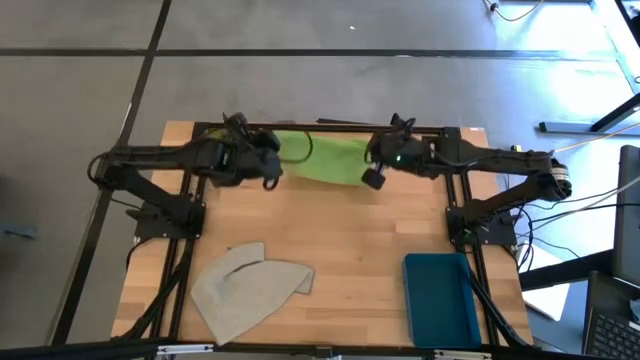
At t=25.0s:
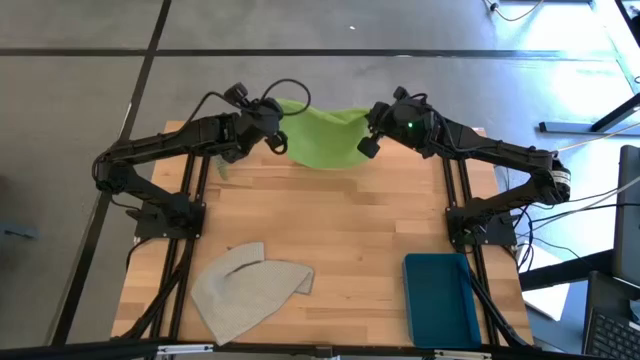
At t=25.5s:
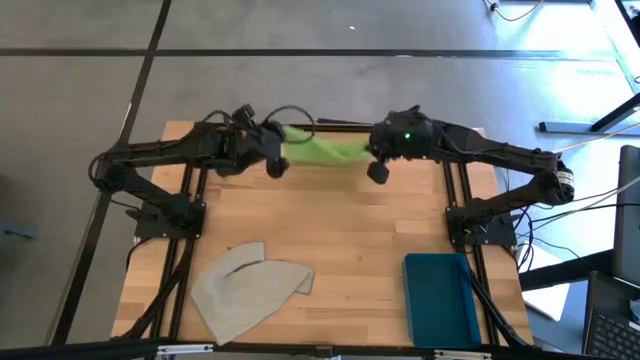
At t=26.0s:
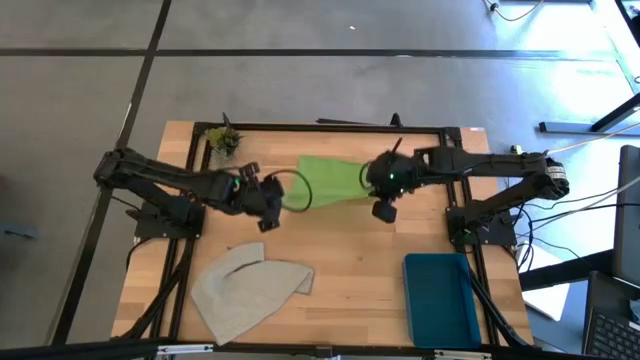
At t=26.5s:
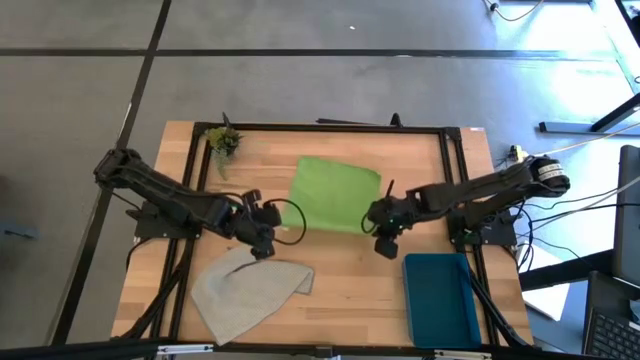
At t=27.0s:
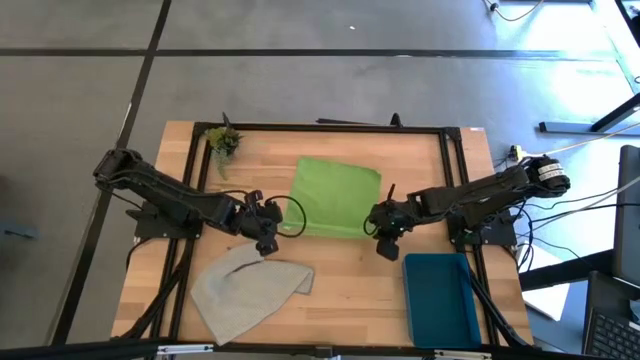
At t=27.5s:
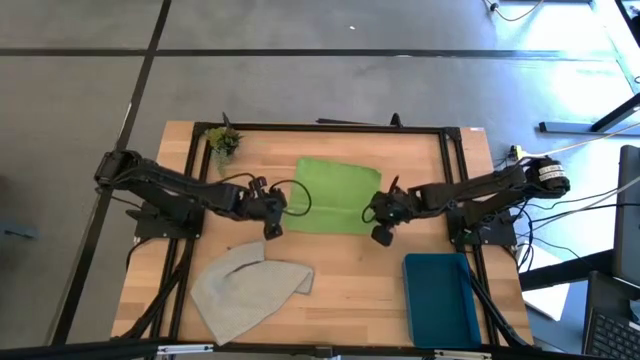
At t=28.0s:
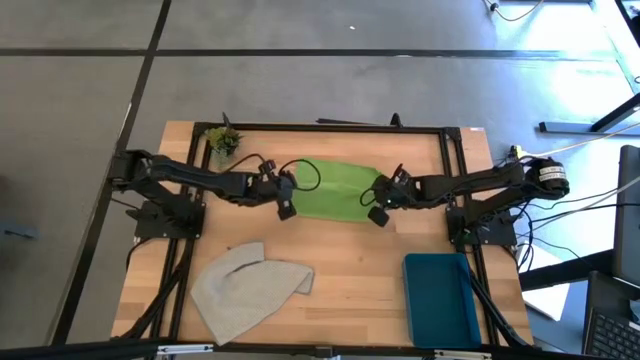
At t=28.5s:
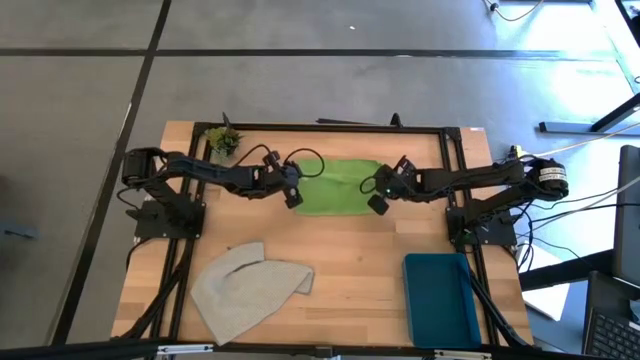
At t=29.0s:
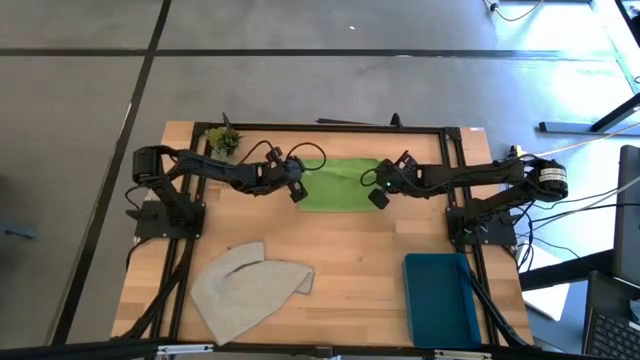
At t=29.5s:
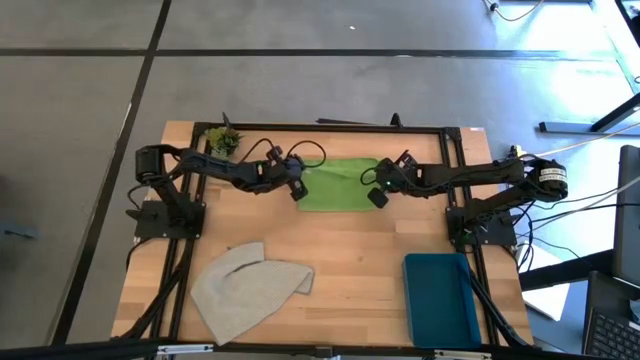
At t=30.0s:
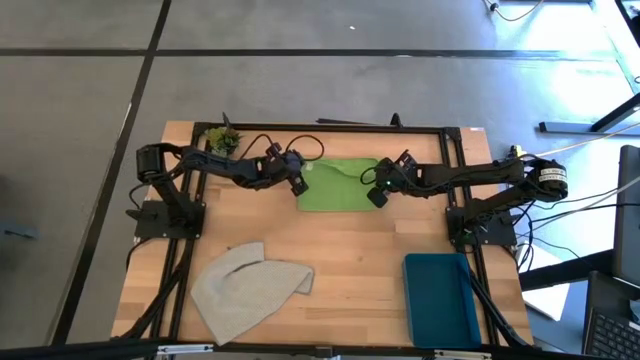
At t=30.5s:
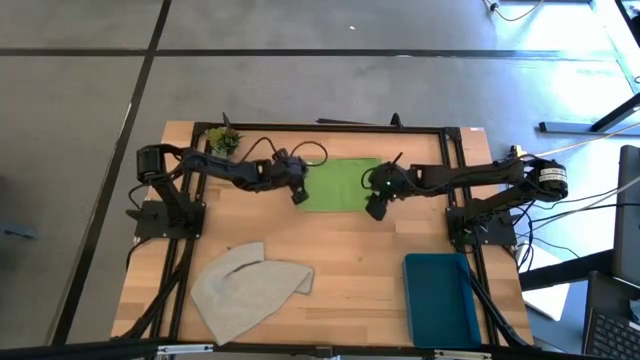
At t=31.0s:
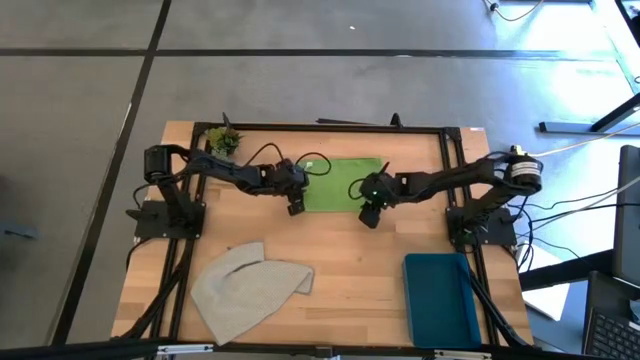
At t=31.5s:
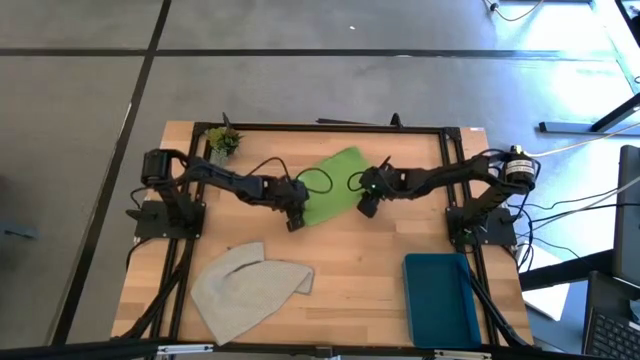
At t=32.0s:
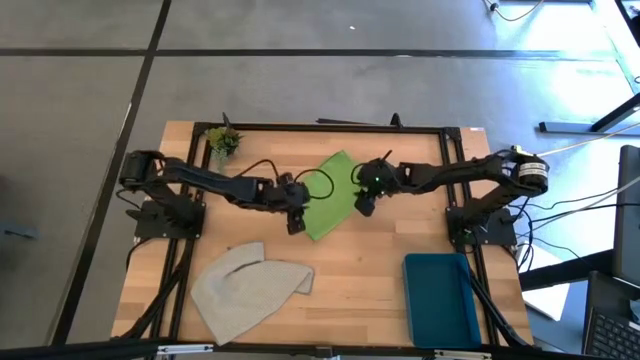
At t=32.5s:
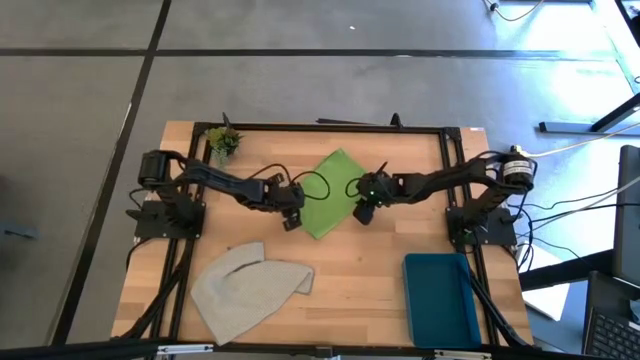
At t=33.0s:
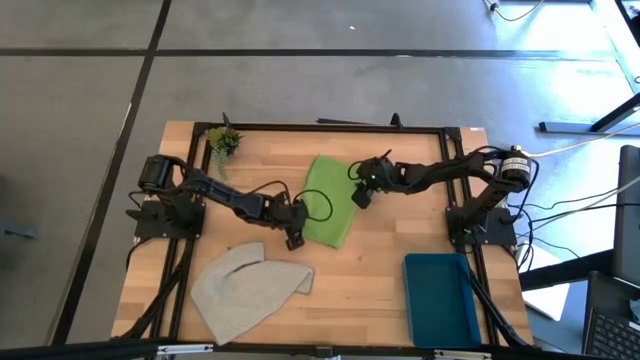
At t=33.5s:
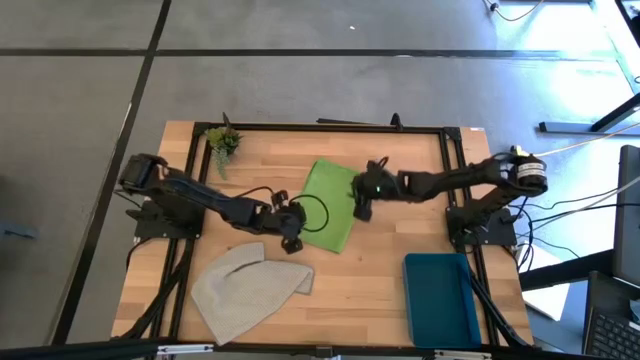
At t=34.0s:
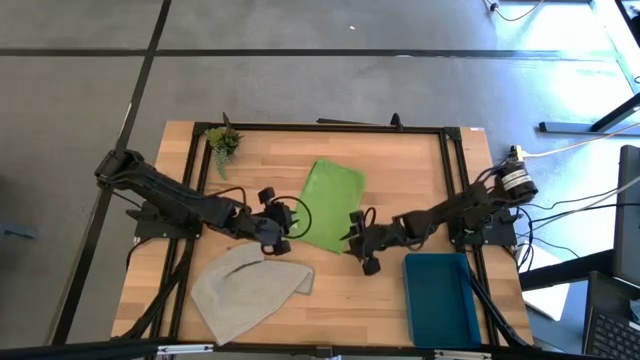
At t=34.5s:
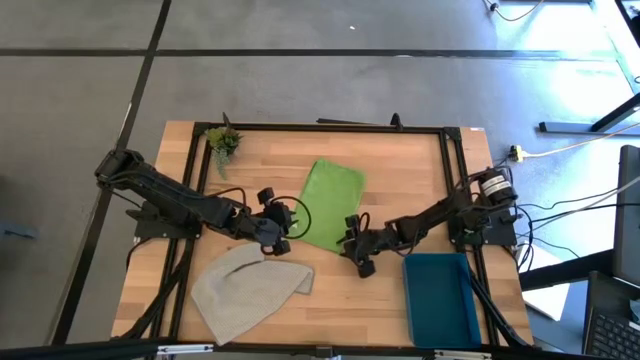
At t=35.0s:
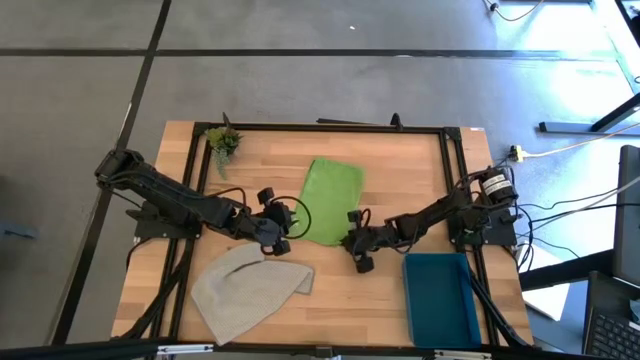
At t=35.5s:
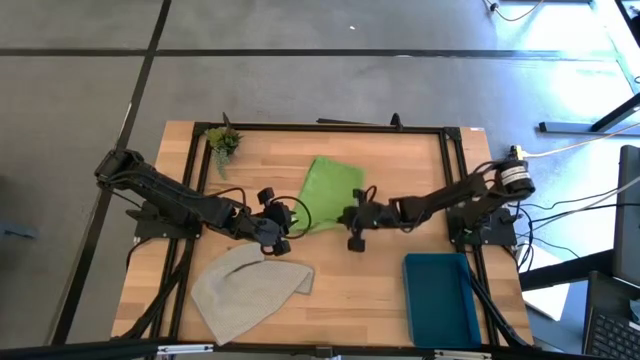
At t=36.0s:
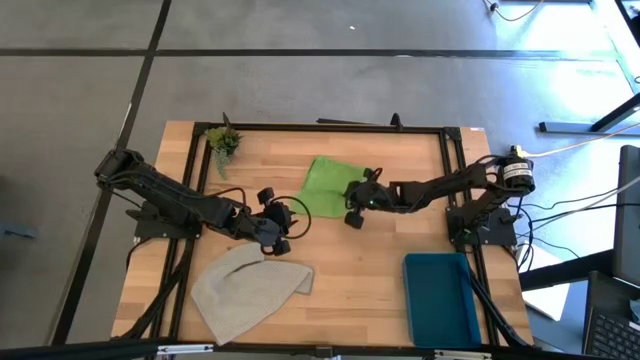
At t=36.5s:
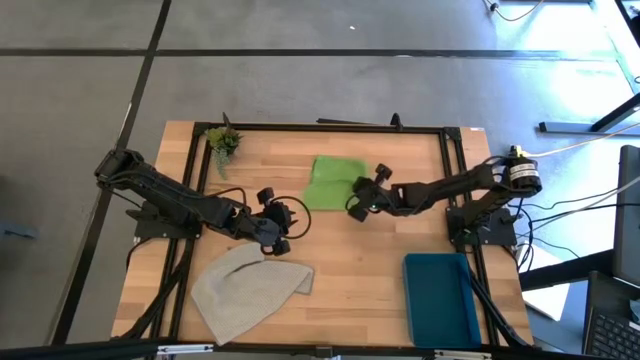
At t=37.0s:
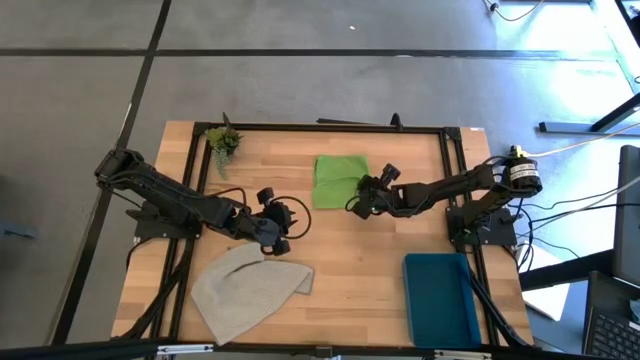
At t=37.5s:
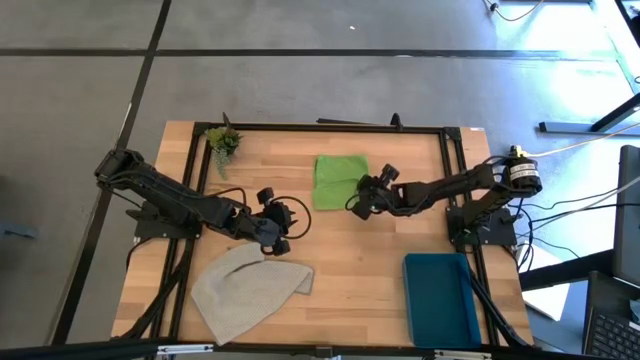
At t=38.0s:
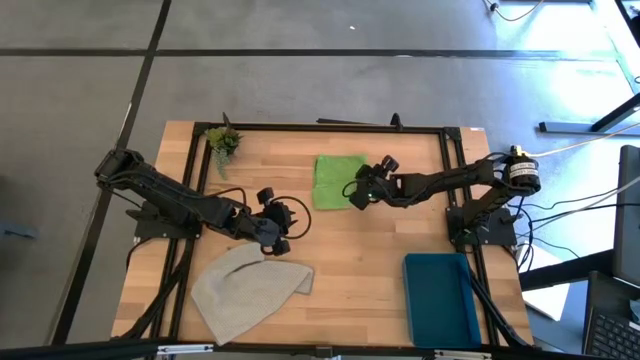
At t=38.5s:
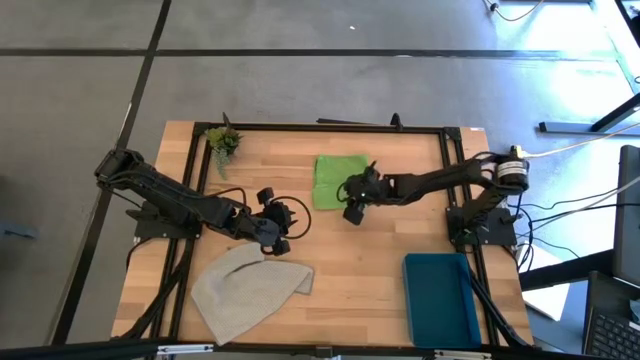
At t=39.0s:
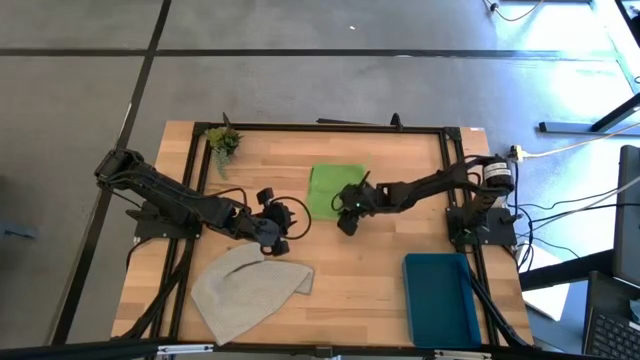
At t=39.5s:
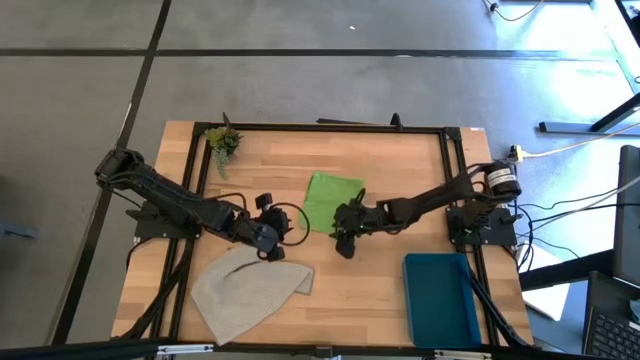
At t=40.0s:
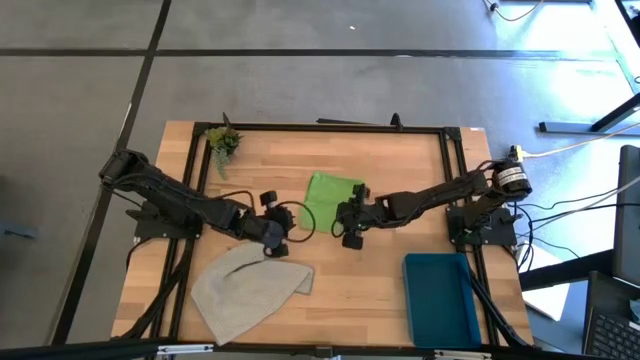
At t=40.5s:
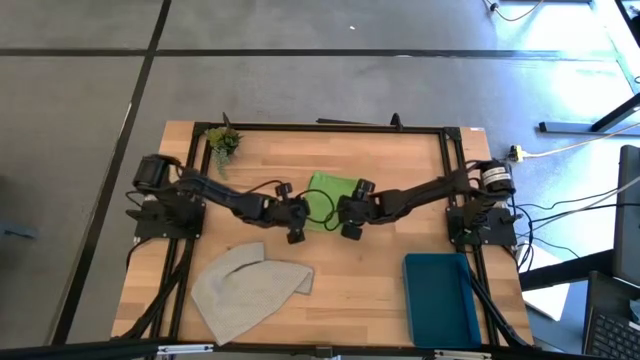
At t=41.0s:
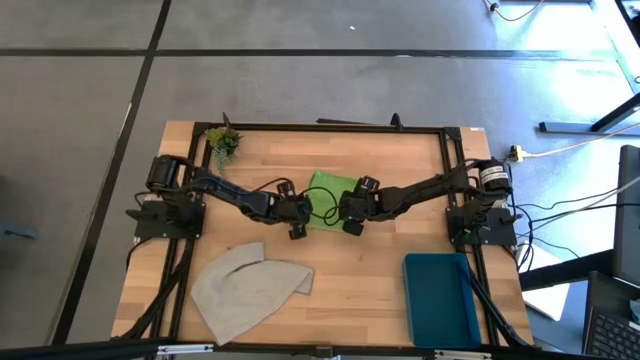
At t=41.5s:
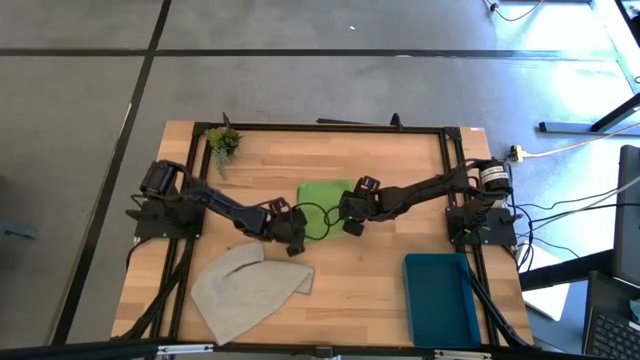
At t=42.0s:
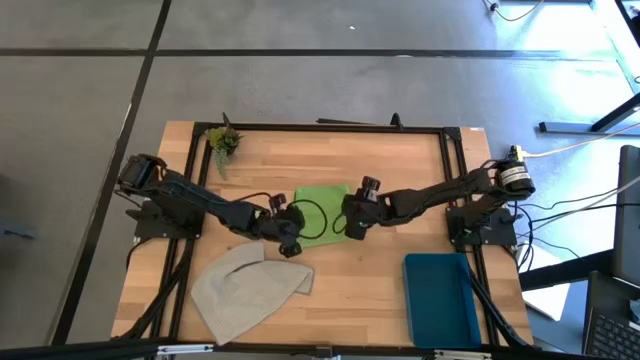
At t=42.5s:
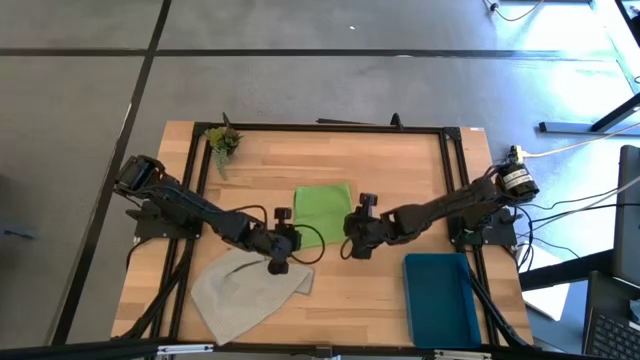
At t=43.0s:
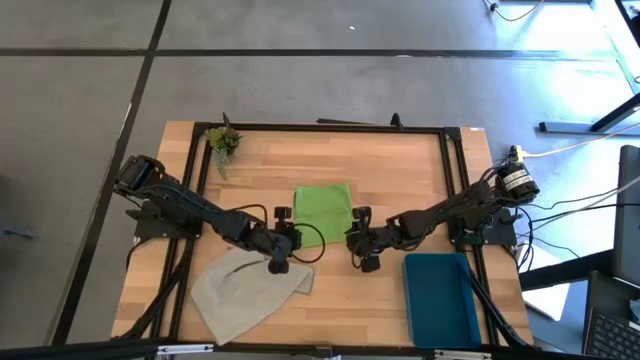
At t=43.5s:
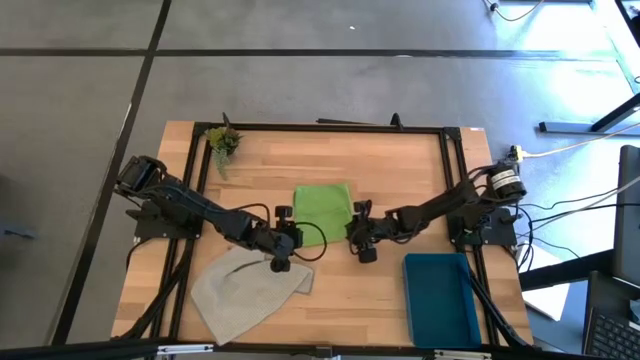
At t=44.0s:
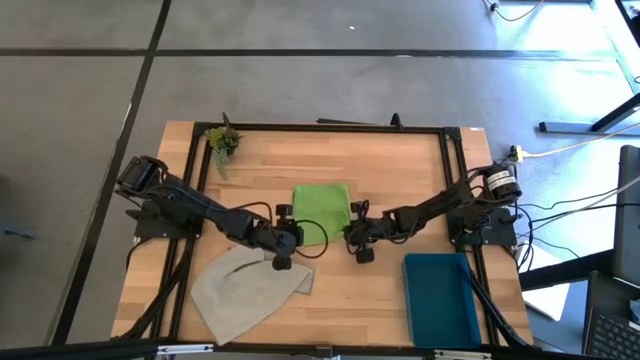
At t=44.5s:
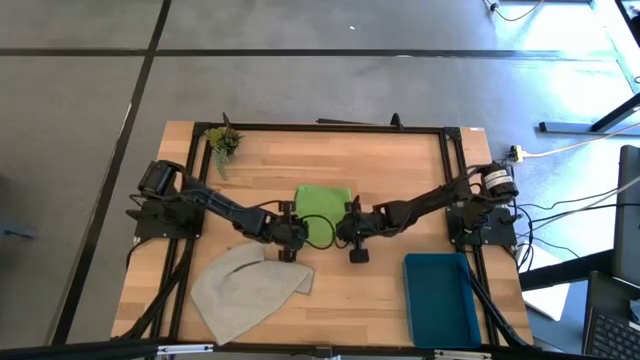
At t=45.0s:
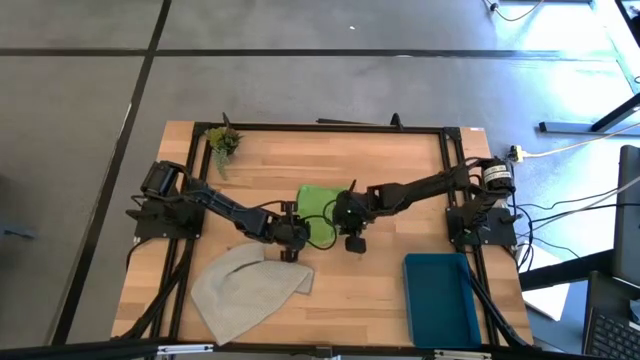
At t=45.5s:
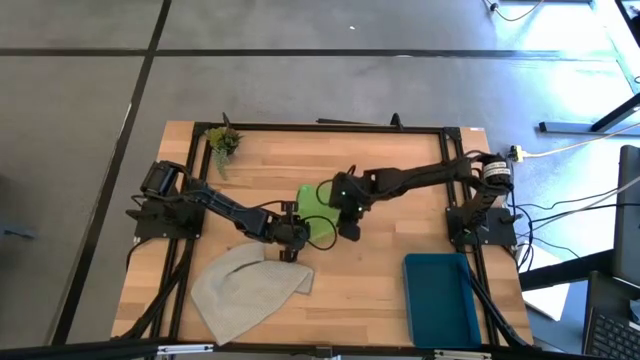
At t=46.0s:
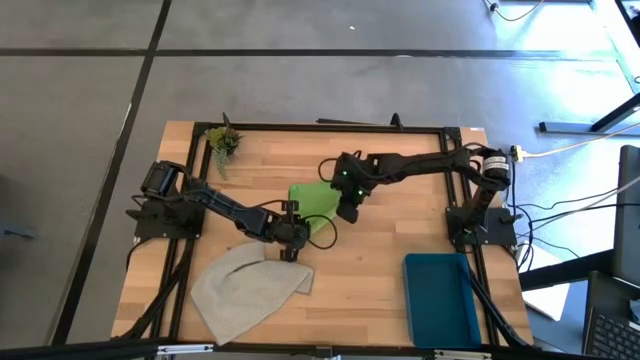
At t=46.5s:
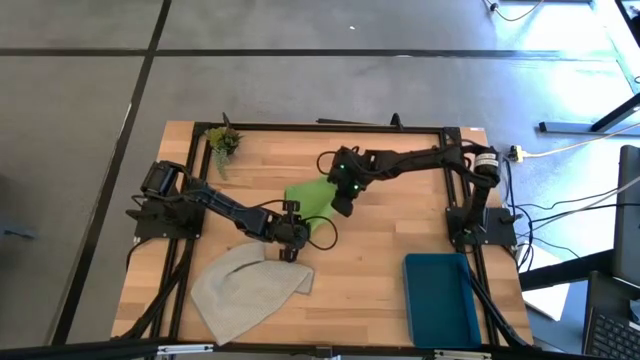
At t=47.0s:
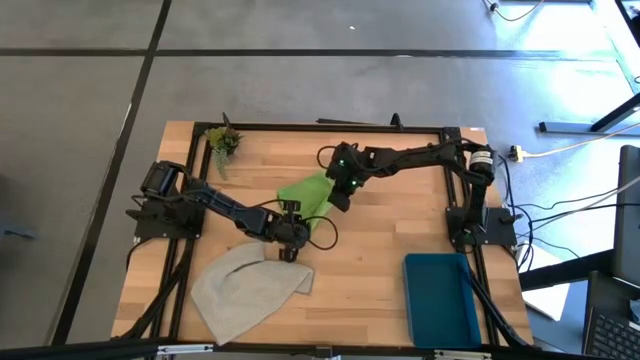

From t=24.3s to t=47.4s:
Task: Roll microfiber towels into tight, uniform cylinder then place into a basket
Roll the green microfiber cloth
